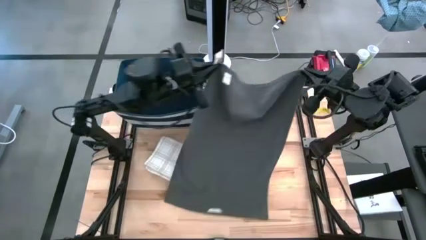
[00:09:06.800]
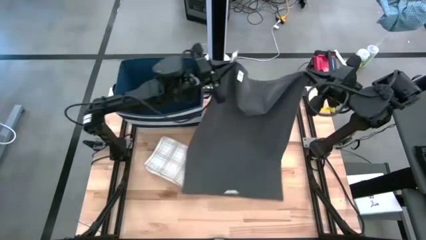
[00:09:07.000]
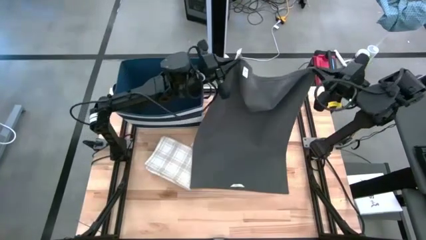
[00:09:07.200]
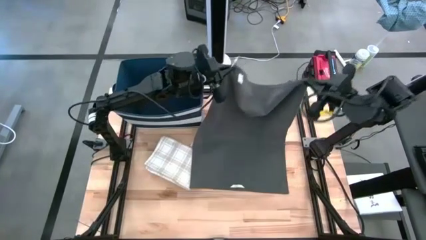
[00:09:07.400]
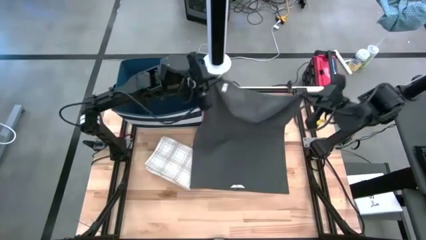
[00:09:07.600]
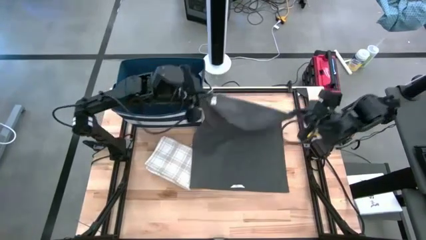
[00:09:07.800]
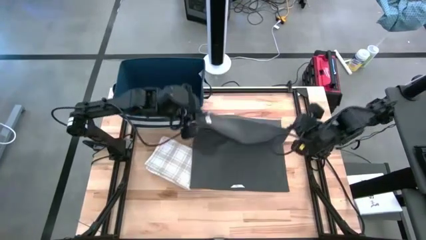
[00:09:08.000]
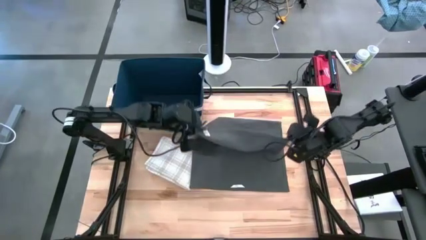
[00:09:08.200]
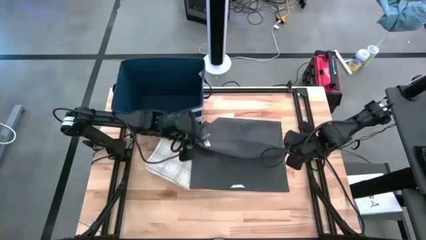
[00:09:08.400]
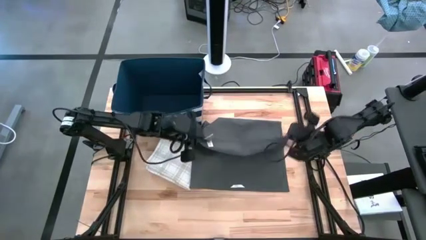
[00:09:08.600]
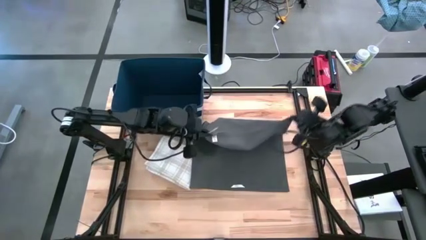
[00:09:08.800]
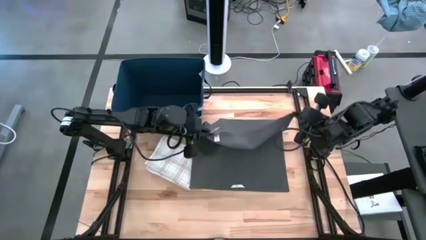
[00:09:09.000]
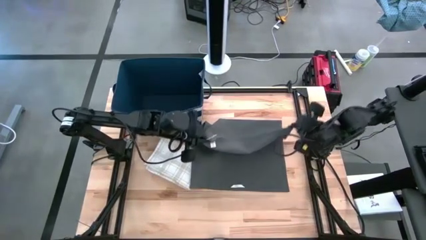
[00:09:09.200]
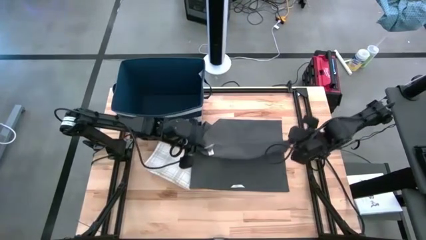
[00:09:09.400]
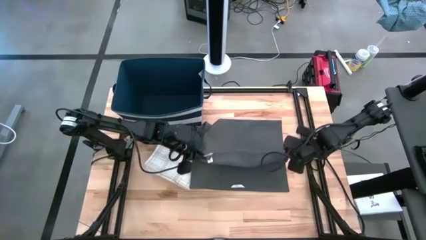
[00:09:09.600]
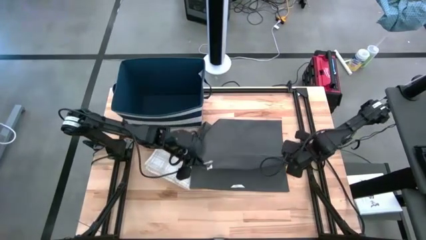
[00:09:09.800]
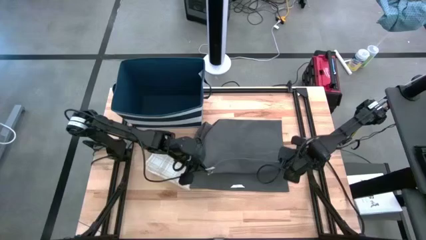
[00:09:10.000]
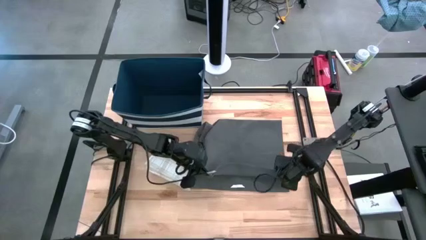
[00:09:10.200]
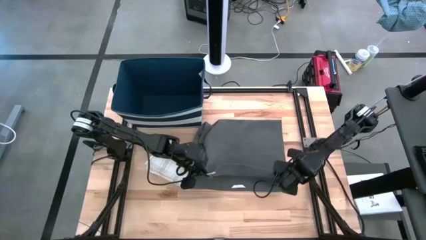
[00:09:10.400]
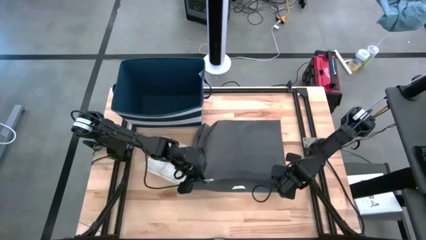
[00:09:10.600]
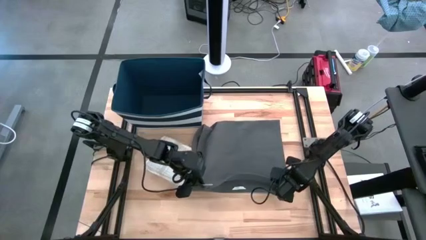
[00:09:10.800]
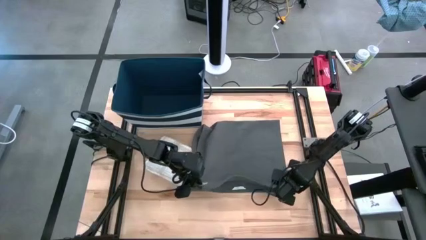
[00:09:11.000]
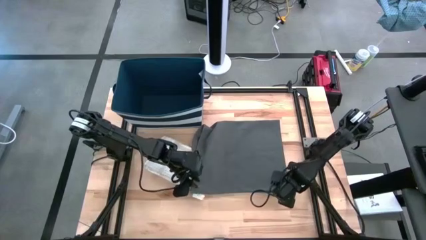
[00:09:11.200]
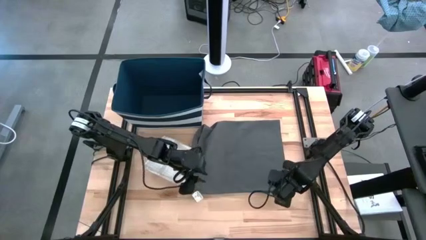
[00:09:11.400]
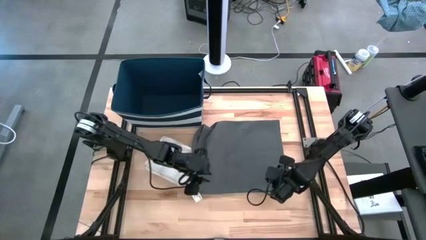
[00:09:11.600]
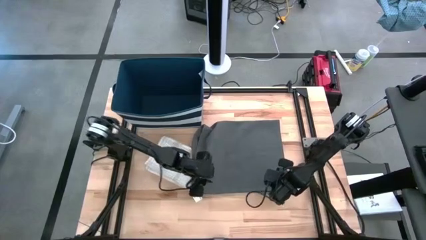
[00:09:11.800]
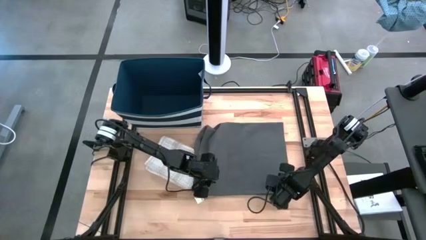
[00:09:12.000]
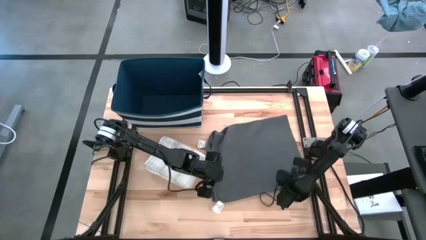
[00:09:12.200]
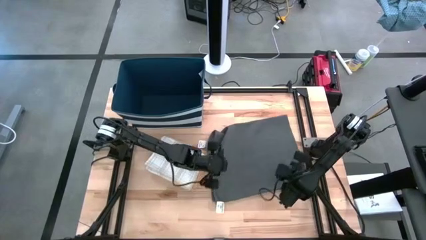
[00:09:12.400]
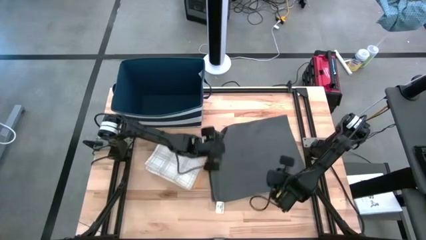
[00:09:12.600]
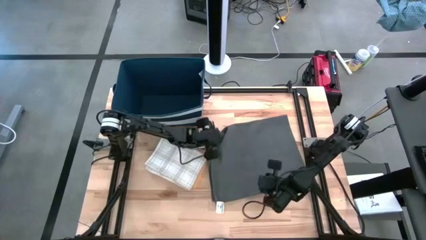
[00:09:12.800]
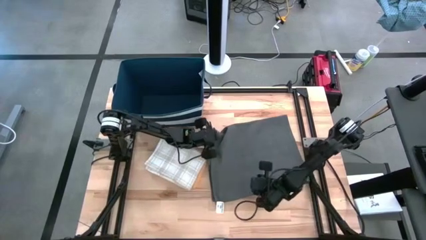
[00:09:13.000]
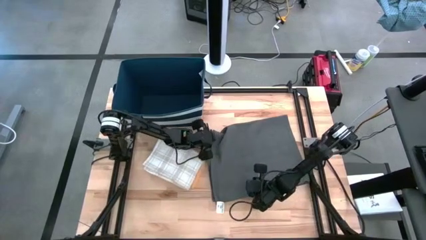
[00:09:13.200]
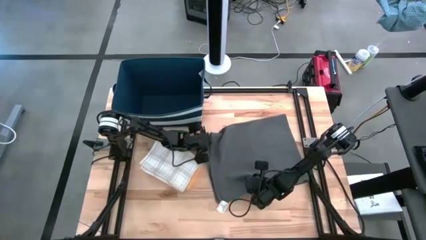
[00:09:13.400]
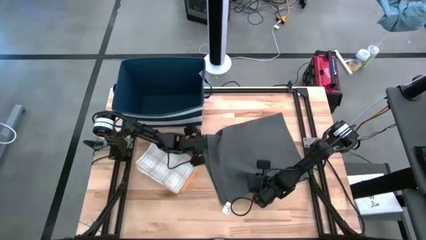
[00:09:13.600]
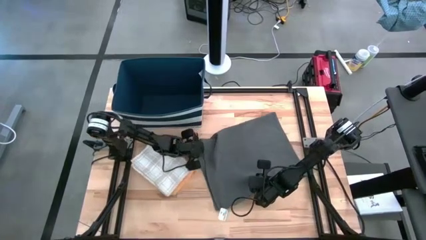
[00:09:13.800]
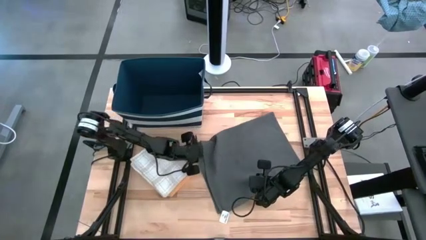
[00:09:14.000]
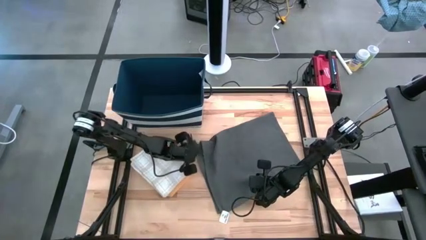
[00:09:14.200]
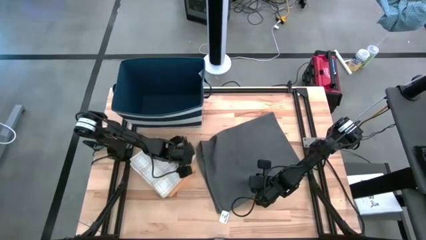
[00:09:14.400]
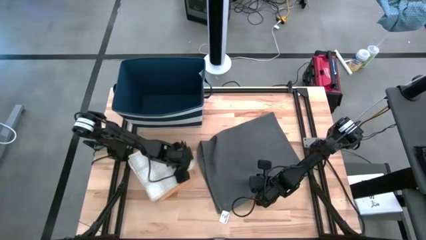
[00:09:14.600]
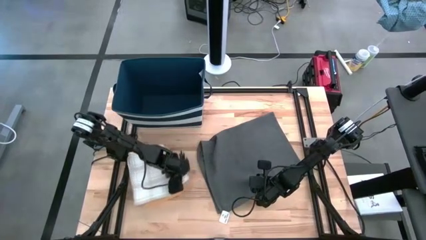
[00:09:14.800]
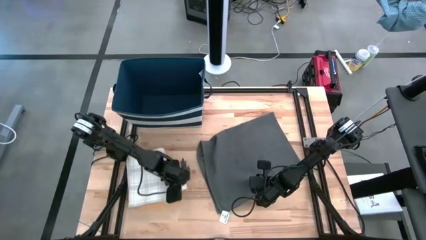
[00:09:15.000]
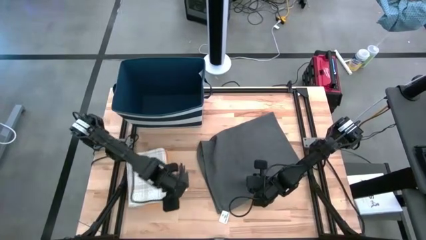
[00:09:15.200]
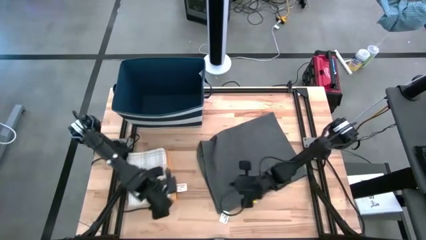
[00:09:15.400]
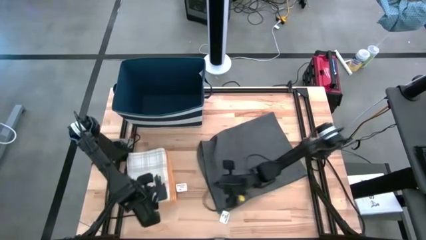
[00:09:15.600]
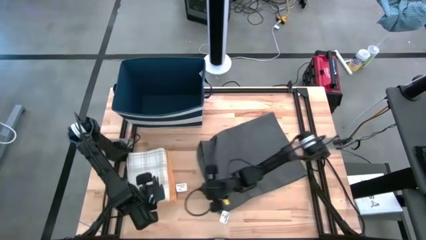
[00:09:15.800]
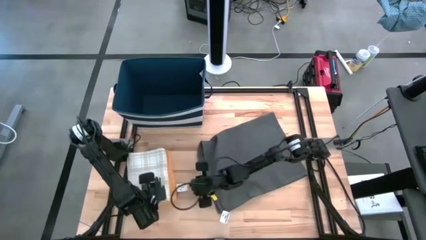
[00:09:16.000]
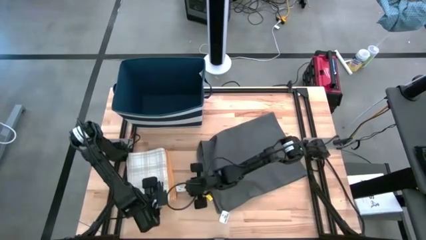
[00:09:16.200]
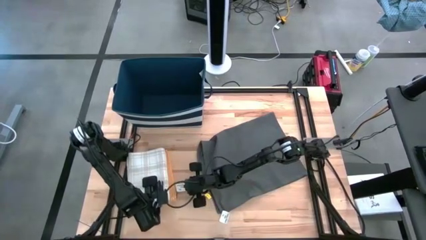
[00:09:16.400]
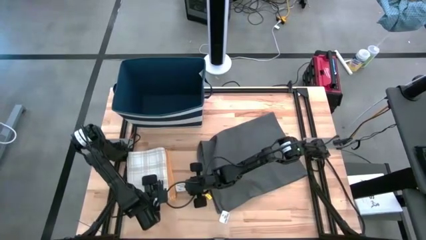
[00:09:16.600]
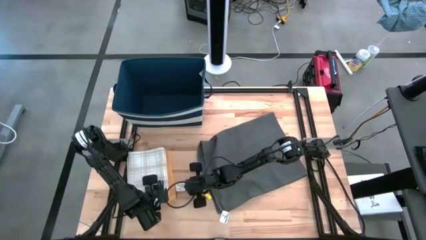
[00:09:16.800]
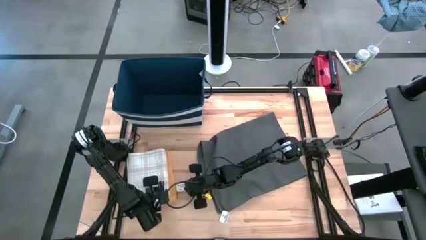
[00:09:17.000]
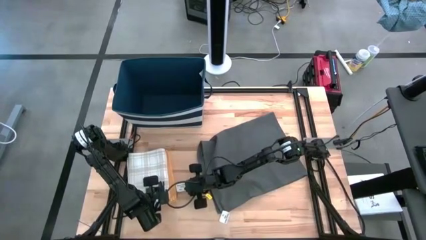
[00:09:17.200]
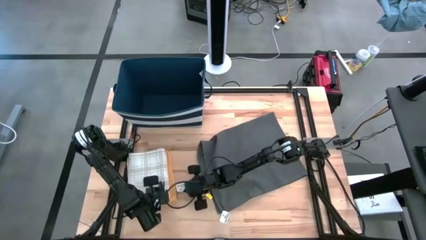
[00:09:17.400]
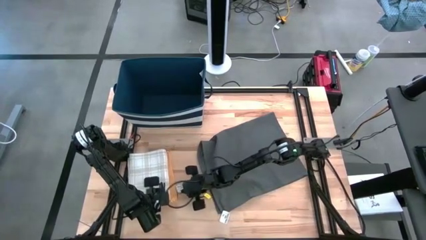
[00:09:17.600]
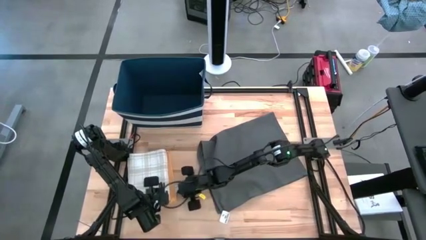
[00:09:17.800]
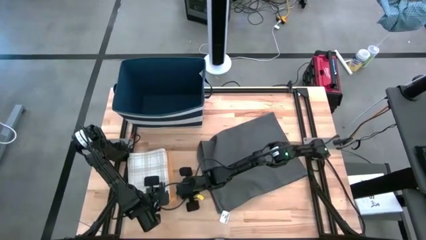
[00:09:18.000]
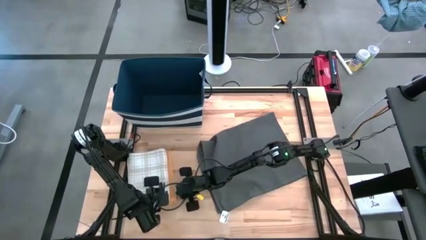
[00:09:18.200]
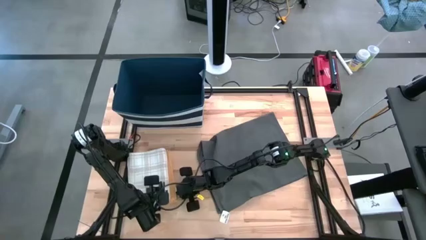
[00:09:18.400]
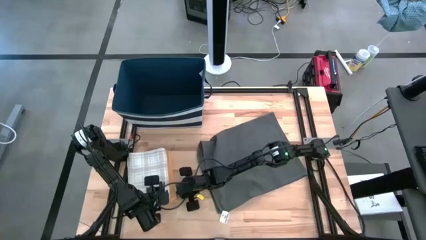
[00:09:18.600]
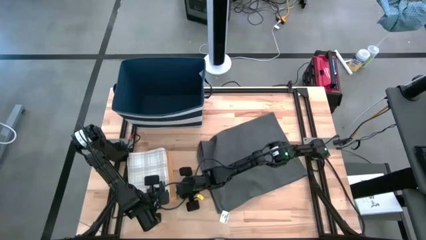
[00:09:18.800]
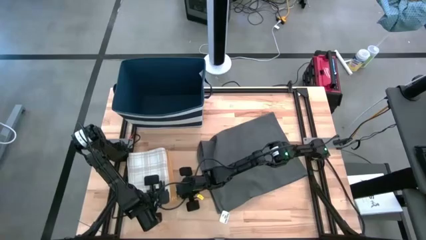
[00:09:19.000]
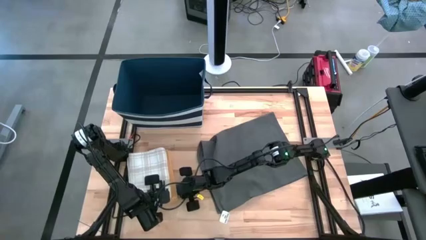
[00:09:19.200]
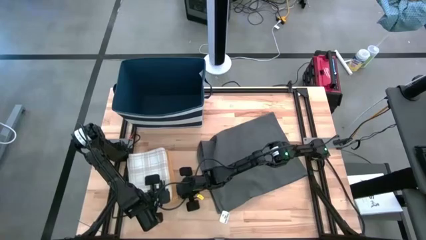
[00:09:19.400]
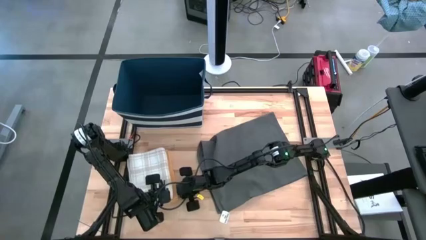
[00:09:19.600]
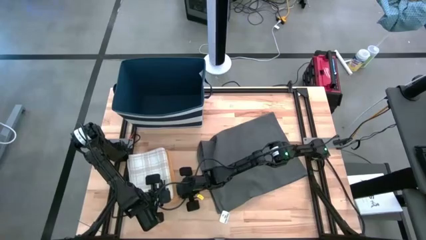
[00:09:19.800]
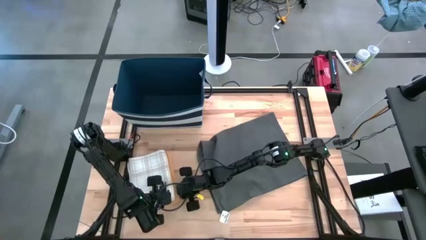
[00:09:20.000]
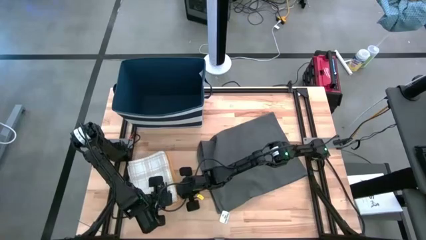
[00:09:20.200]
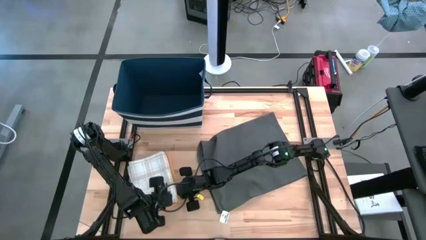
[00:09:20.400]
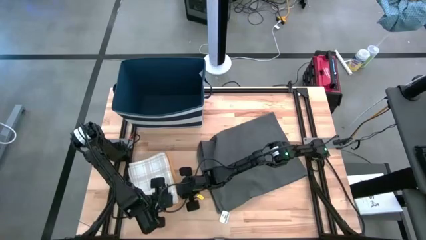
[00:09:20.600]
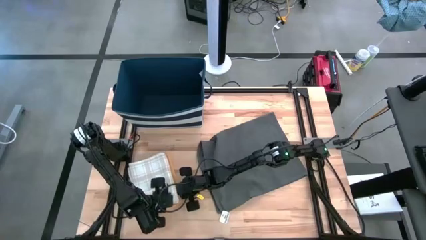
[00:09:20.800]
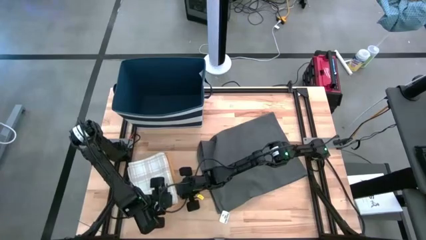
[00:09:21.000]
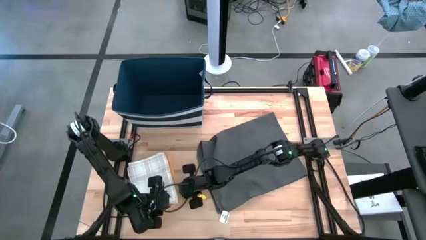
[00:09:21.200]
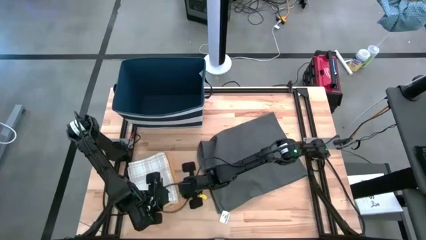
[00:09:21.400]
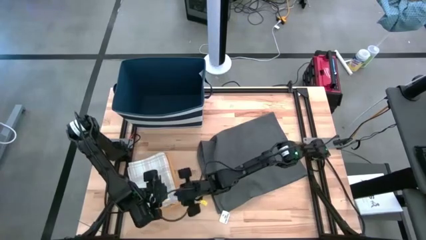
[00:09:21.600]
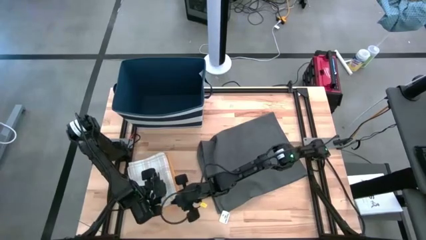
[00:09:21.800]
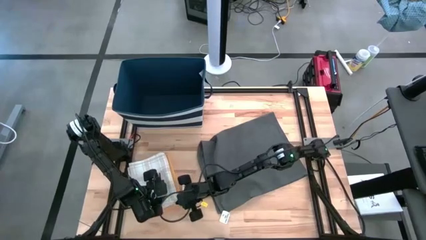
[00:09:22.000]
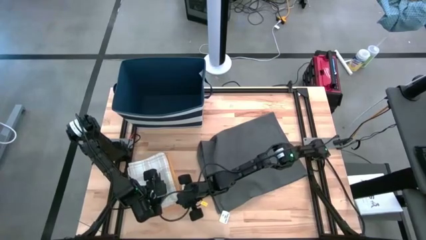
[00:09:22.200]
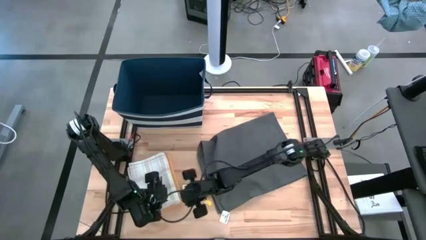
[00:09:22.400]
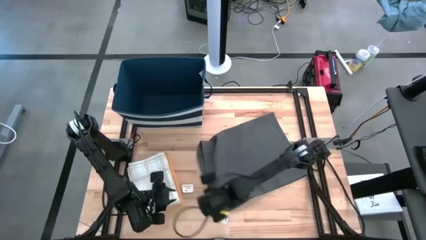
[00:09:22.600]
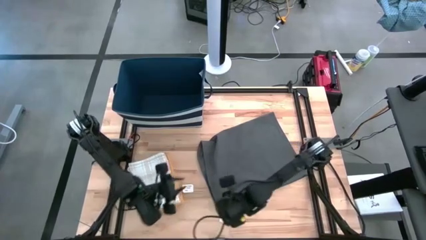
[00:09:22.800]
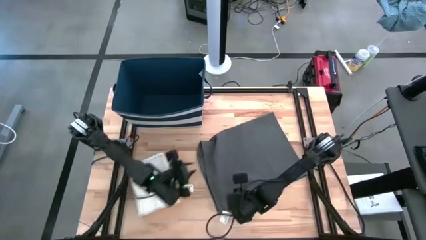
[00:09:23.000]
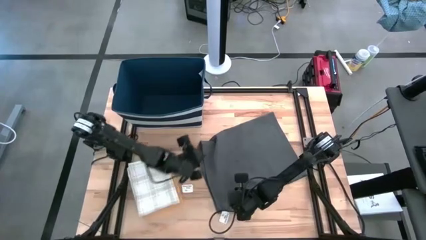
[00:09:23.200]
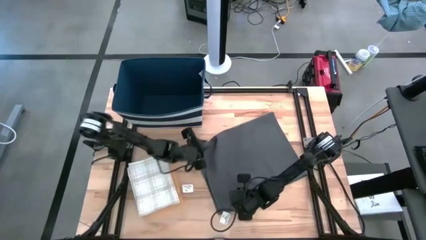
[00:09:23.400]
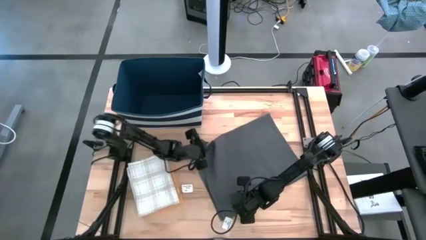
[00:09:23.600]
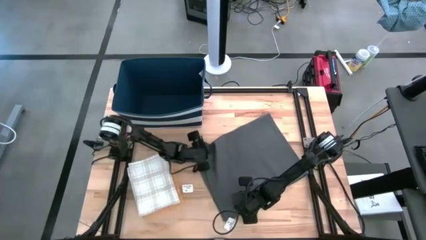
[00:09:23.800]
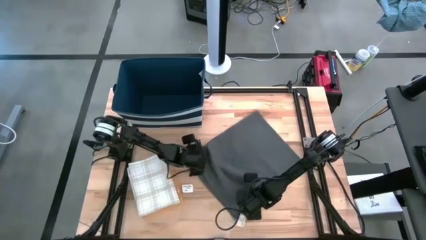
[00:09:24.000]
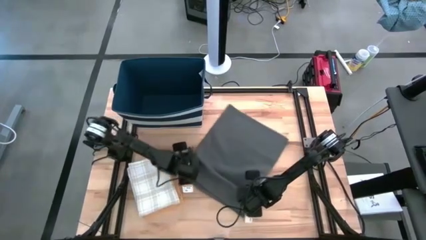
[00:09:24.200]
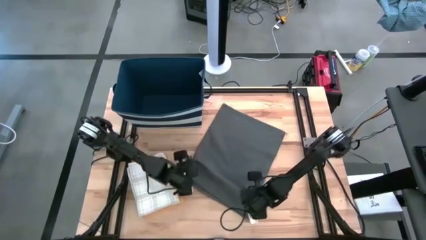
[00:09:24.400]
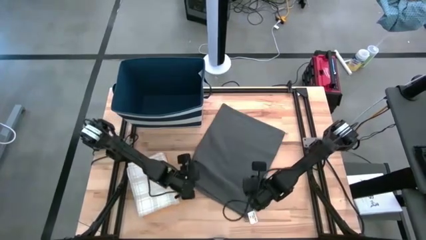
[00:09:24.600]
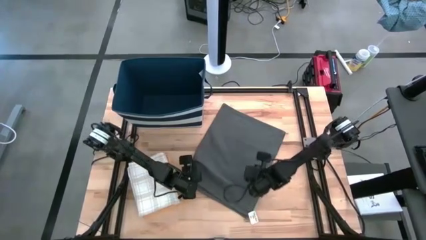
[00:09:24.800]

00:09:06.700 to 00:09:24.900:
Task: Fold towel
Fold the gray kitchen towel
